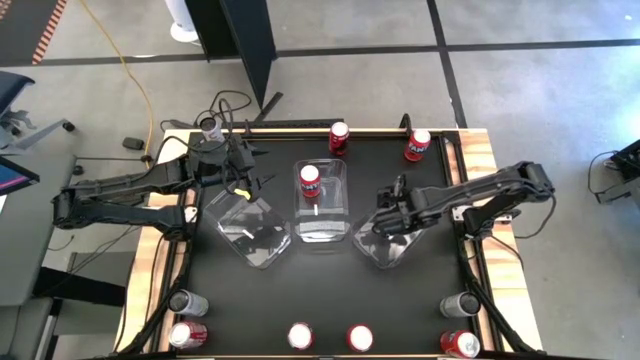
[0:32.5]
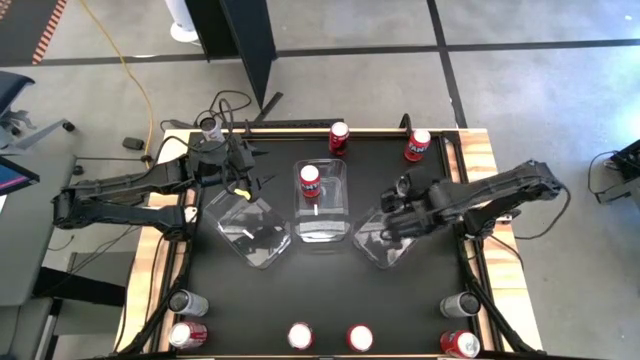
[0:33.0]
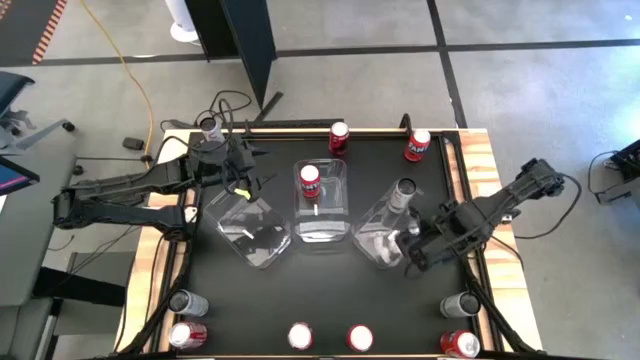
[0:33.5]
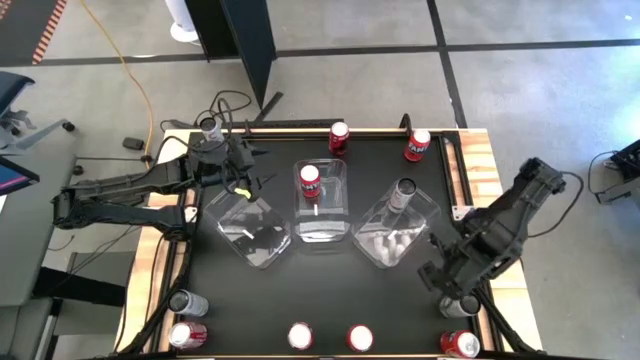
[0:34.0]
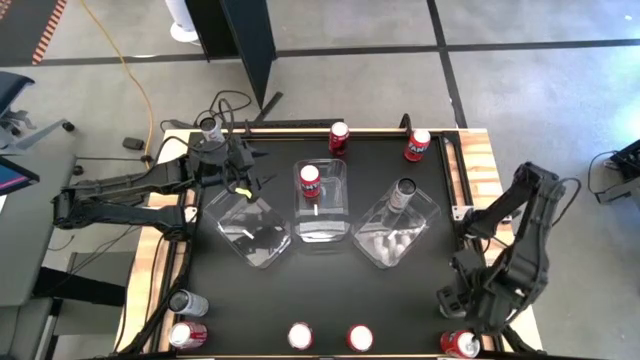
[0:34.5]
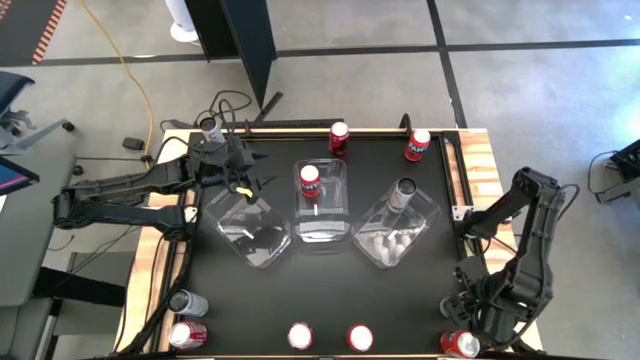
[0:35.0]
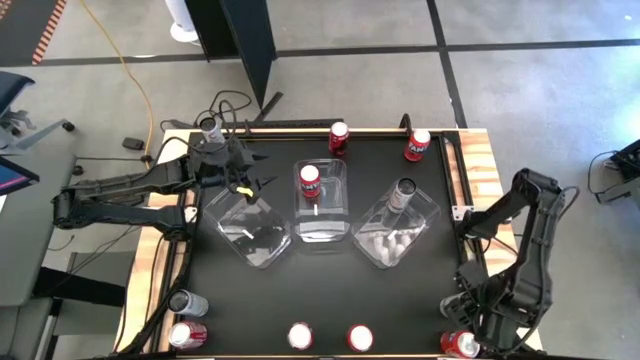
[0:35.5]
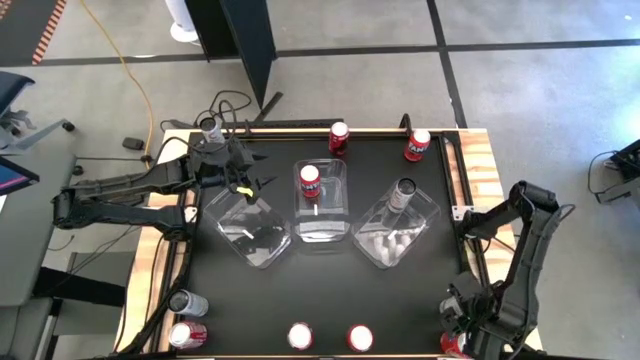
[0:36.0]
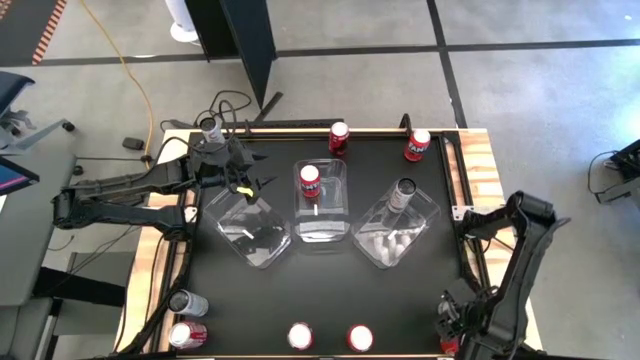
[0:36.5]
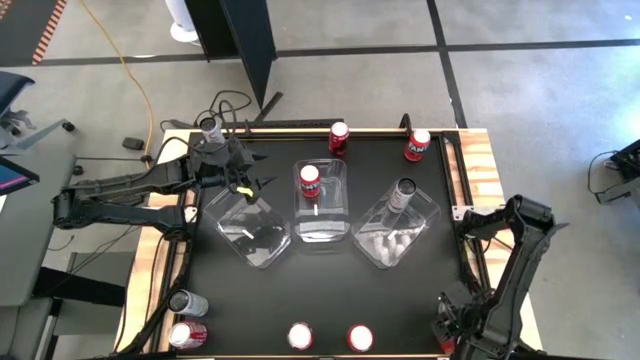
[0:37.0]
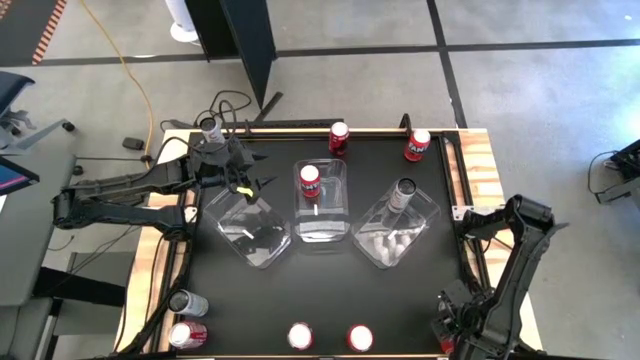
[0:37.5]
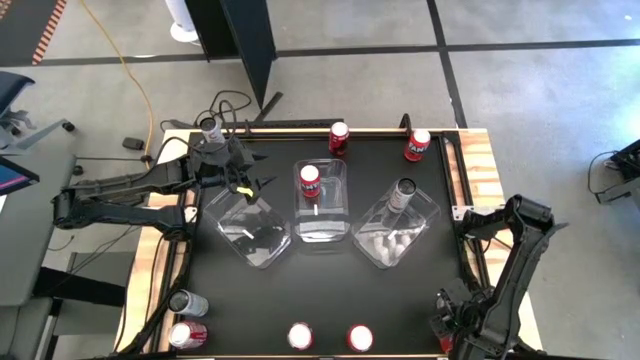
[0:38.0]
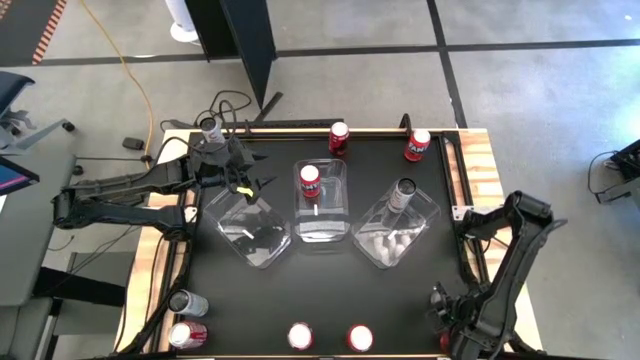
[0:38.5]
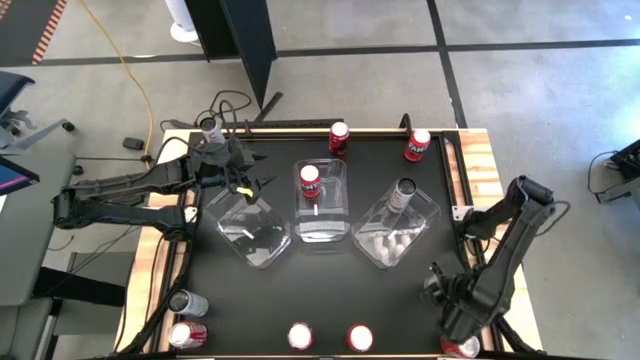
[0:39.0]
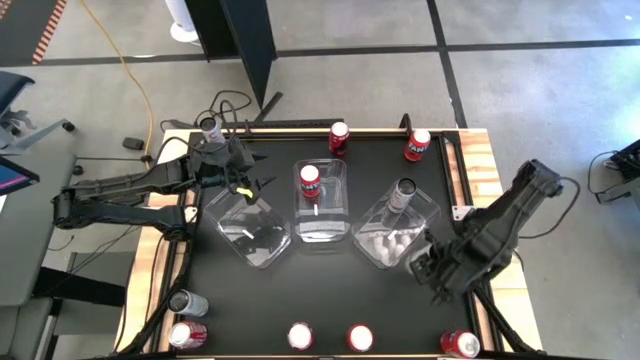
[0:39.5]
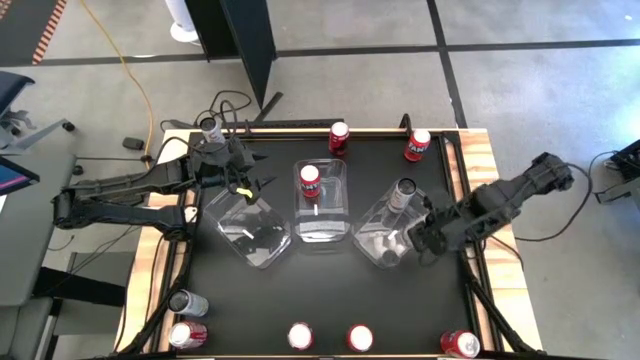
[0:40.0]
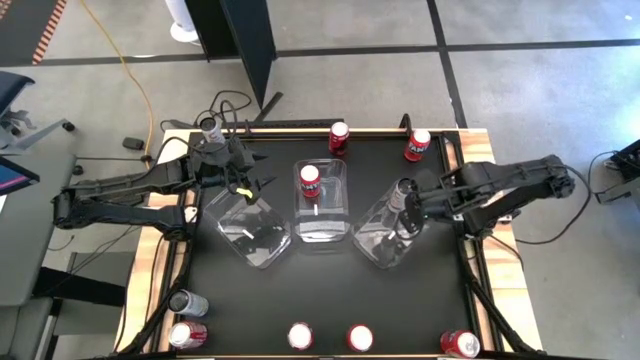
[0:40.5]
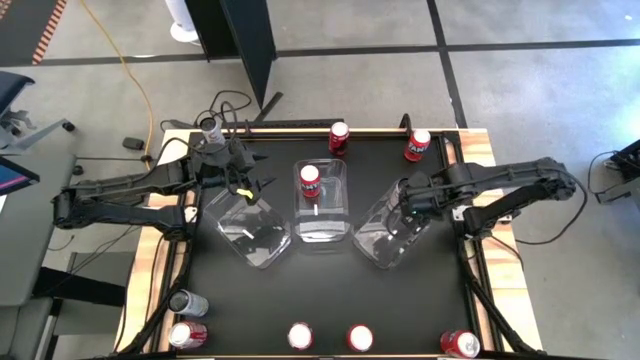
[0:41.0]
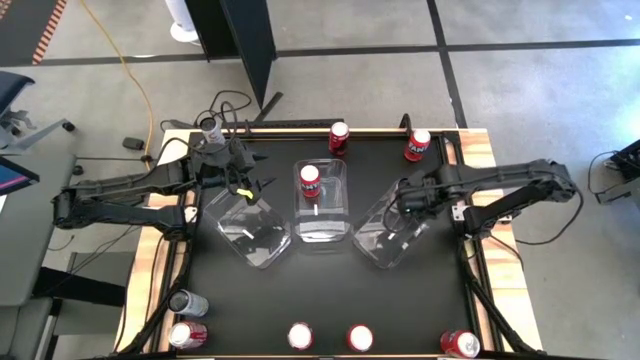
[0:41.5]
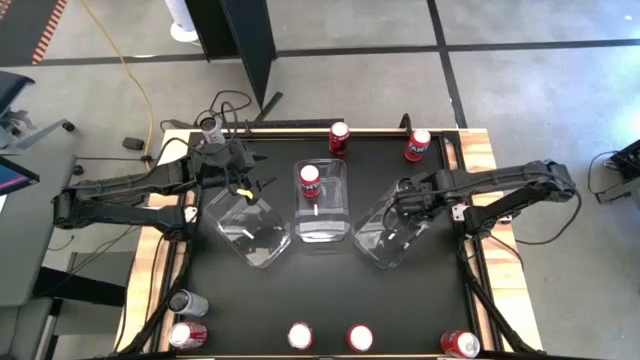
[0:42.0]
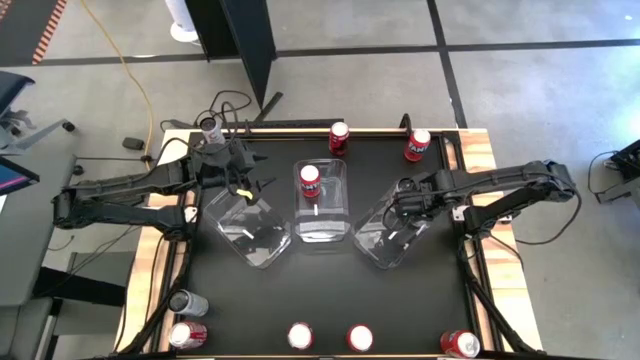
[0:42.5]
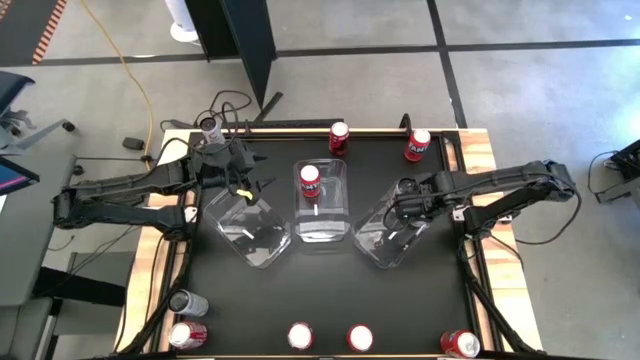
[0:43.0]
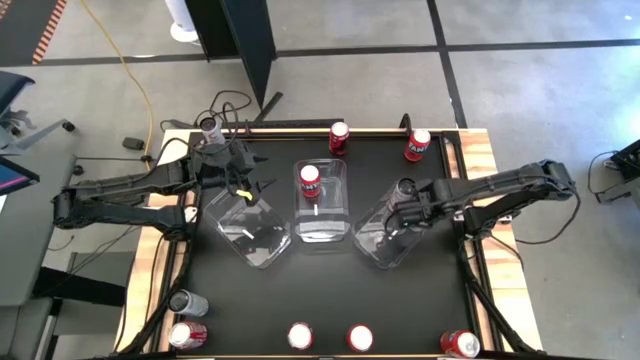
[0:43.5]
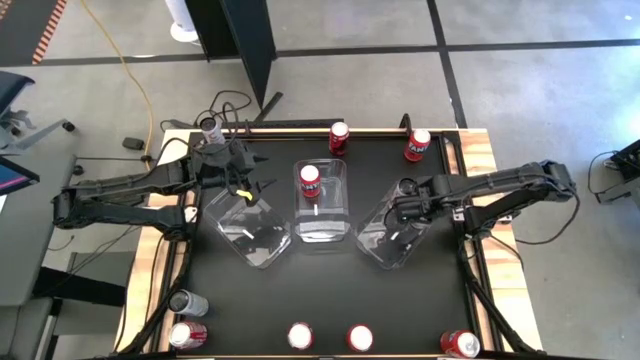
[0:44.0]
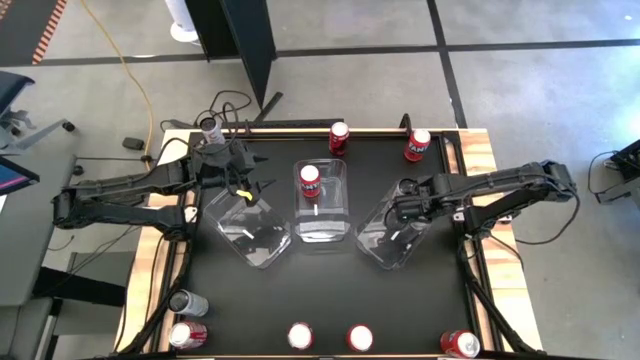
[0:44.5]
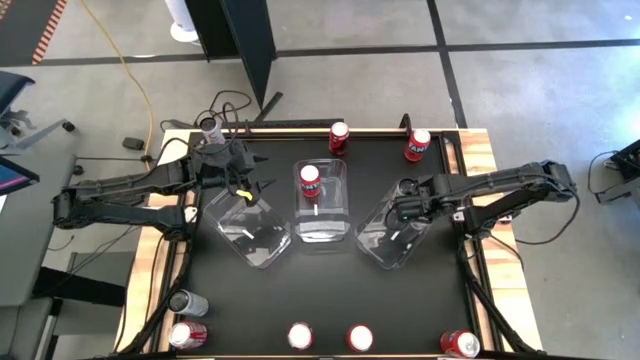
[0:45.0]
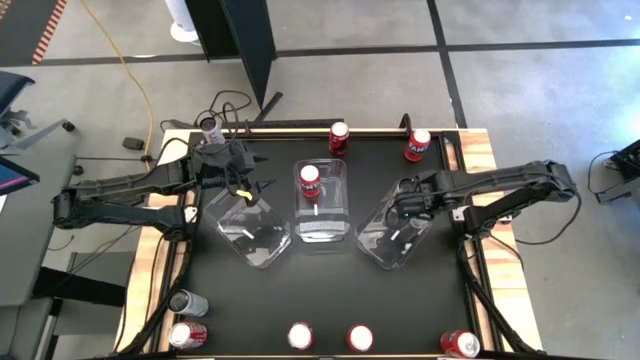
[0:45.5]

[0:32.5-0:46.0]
Task: Sort soda cans
Put the bottom right white soda can into the right transparent bin

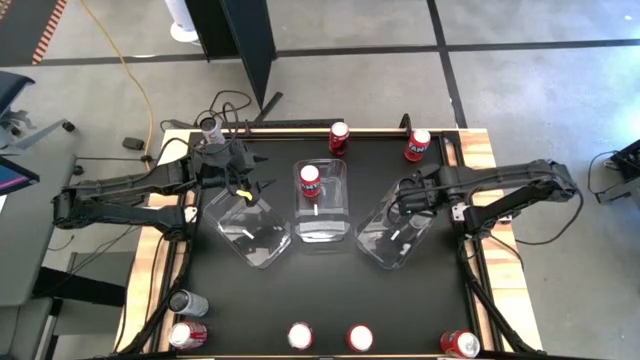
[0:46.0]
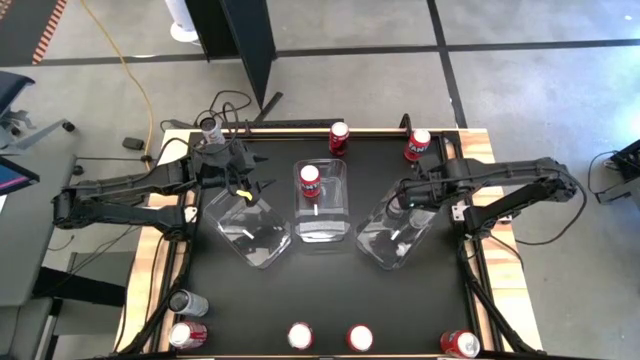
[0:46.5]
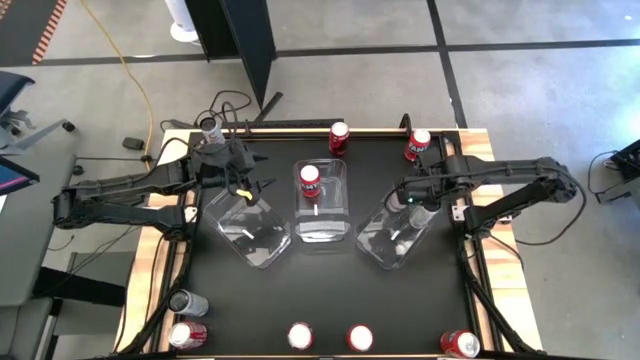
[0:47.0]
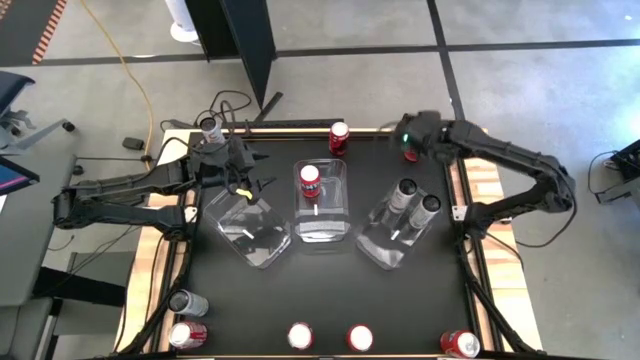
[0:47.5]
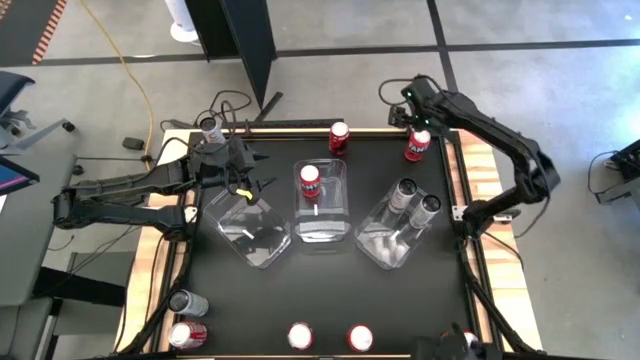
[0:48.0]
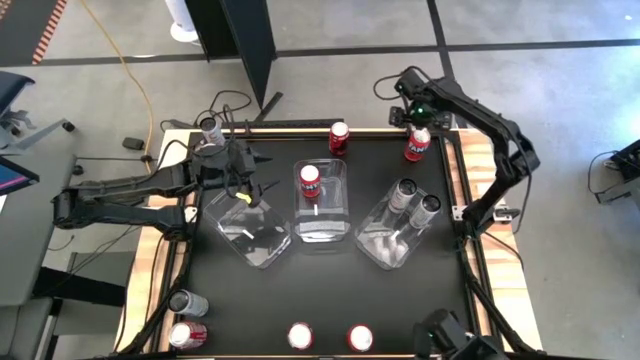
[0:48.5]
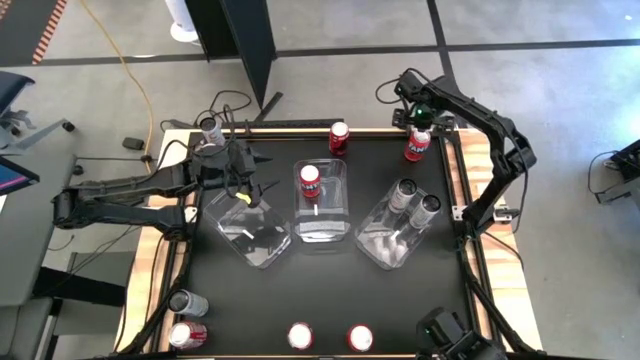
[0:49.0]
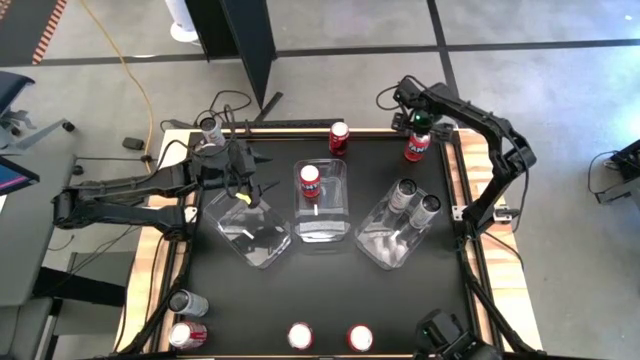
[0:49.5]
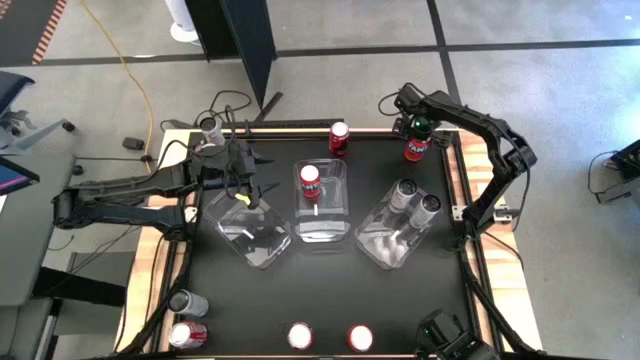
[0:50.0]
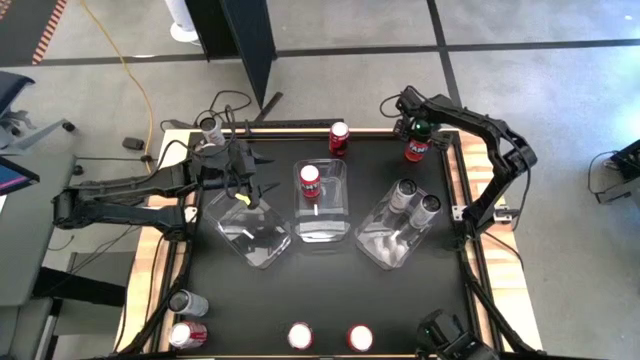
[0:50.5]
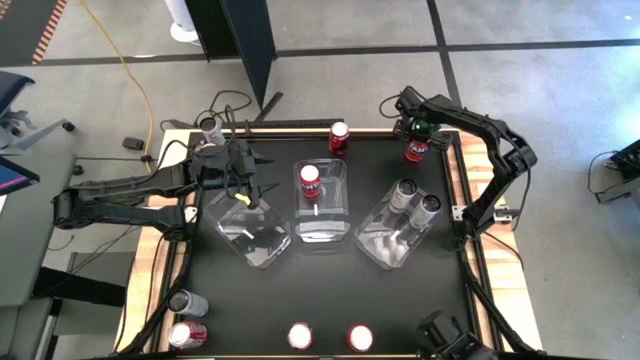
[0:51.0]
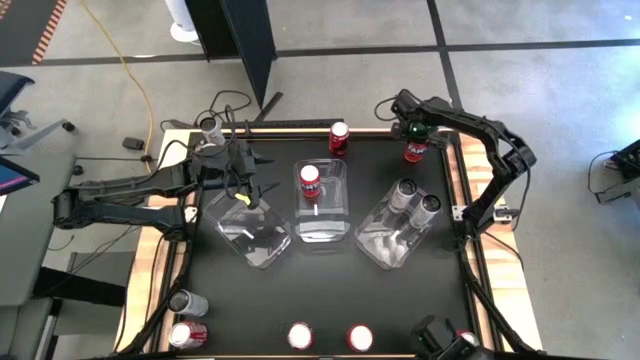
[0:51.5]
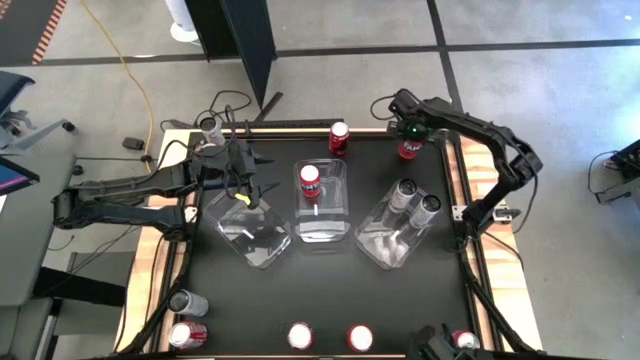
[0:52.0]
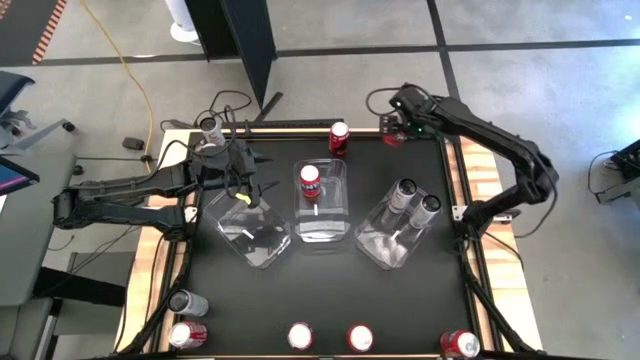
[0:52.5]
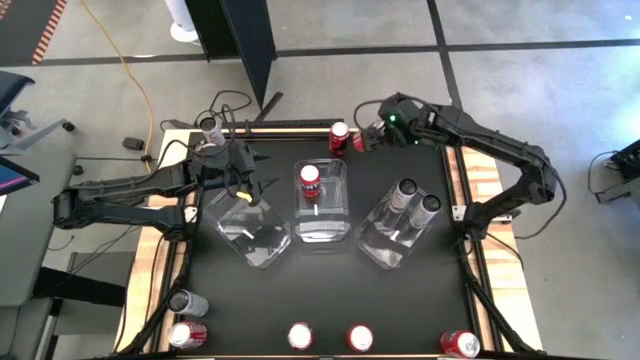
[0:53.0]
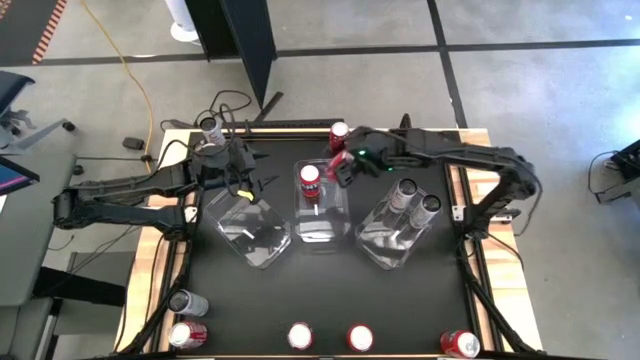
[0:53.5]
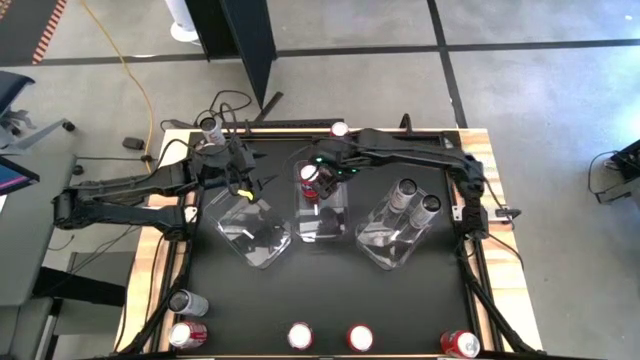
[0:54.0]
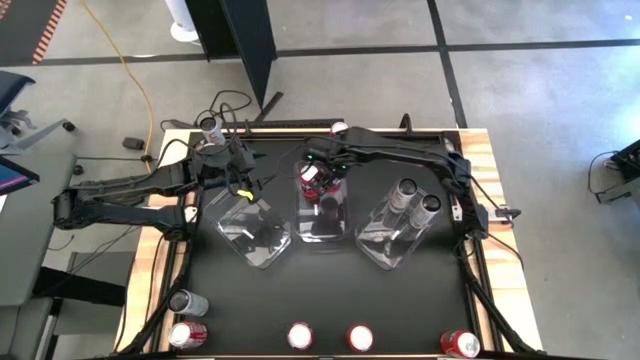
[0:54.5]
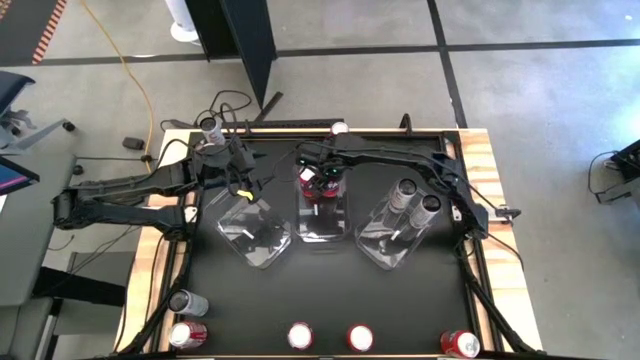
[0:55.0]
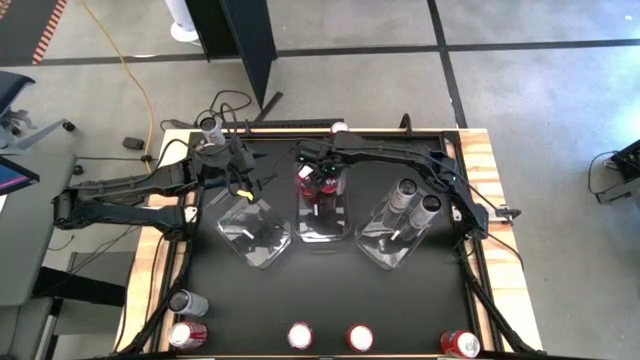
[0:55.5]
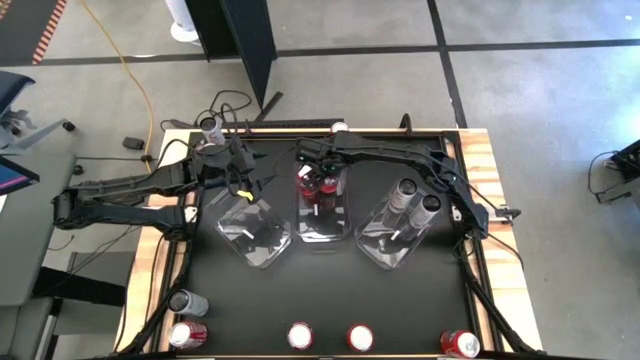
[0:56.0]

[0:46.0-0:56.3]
Put the top right orange soda can into the center transparent bin
